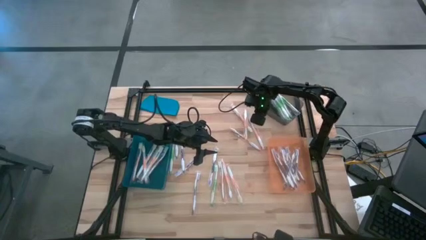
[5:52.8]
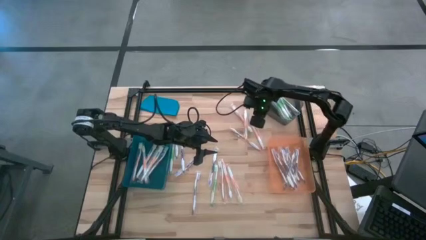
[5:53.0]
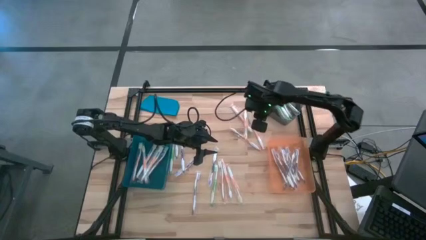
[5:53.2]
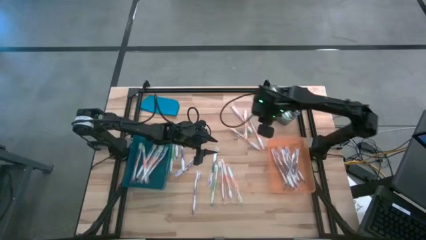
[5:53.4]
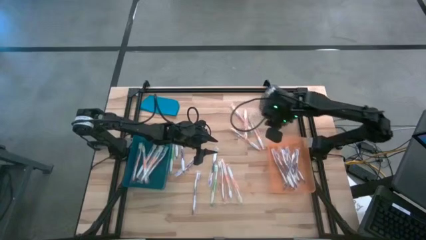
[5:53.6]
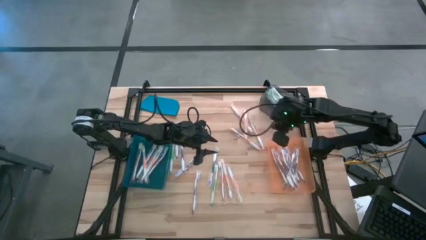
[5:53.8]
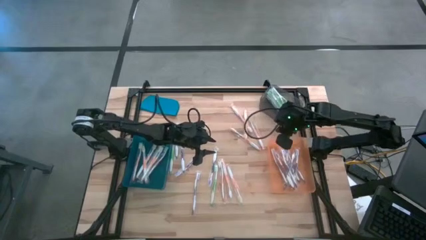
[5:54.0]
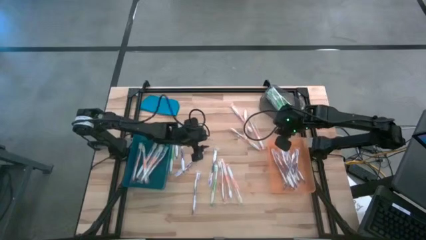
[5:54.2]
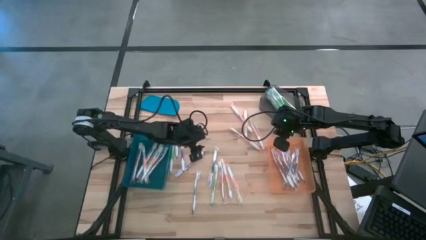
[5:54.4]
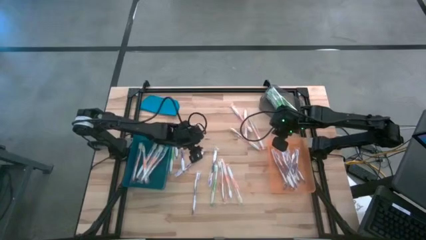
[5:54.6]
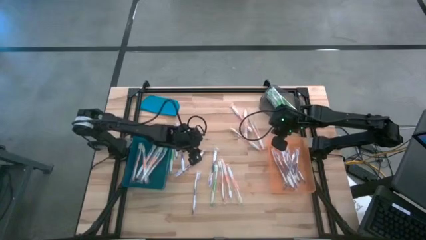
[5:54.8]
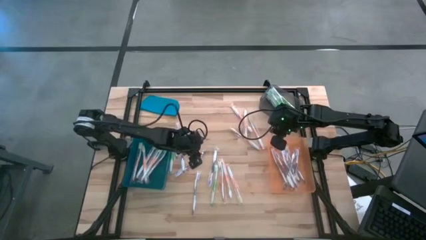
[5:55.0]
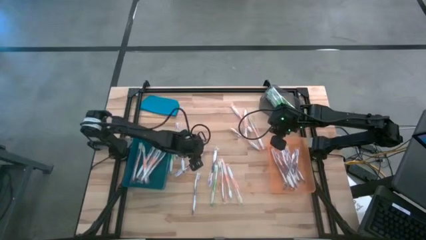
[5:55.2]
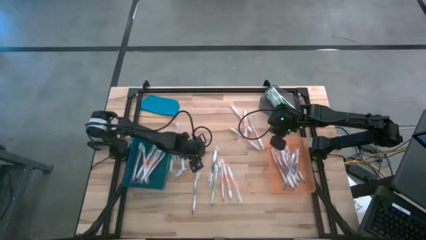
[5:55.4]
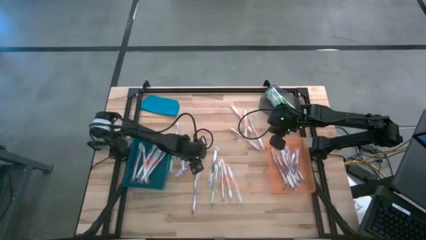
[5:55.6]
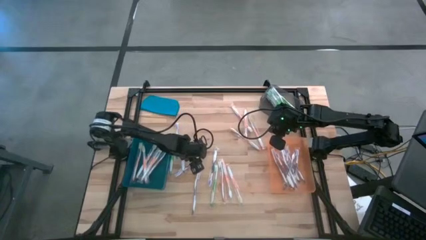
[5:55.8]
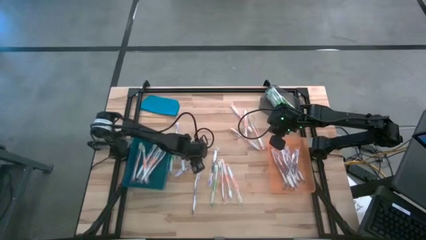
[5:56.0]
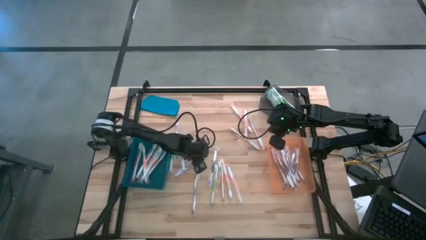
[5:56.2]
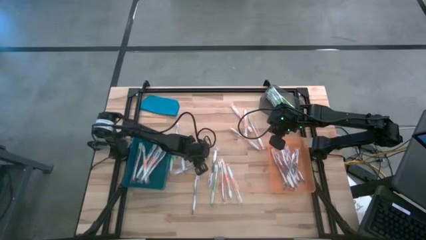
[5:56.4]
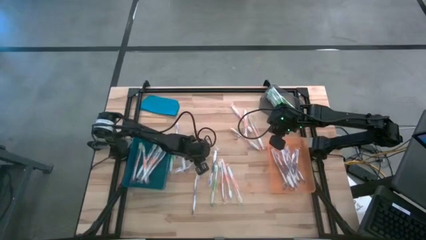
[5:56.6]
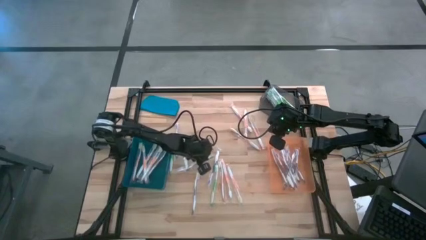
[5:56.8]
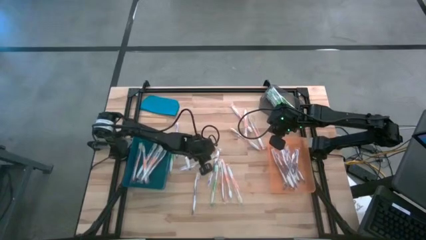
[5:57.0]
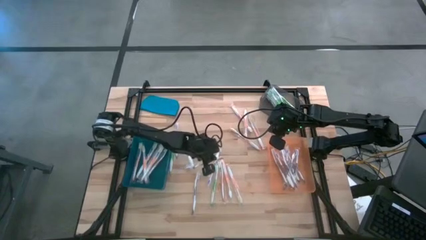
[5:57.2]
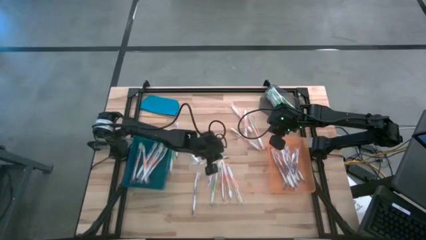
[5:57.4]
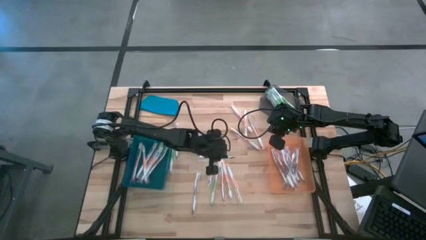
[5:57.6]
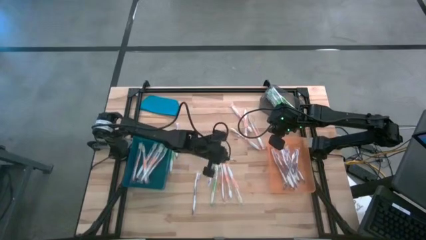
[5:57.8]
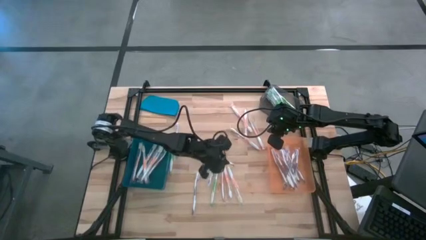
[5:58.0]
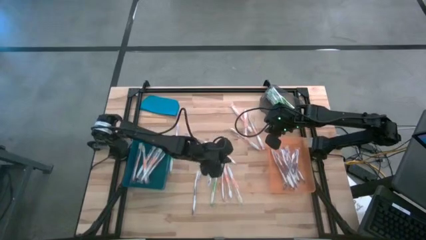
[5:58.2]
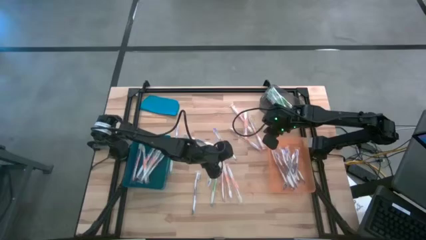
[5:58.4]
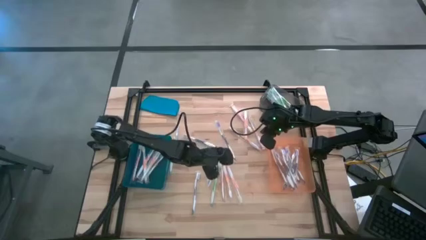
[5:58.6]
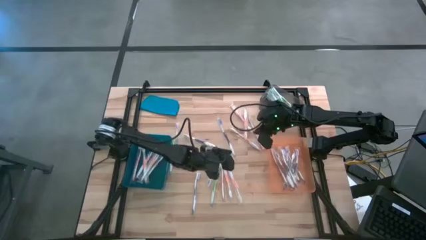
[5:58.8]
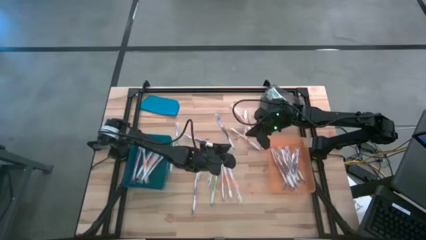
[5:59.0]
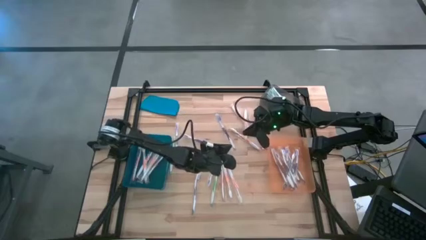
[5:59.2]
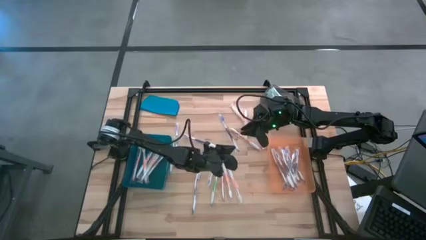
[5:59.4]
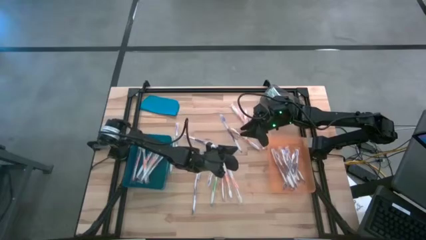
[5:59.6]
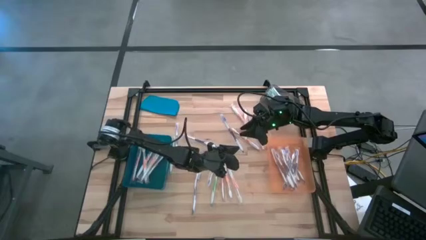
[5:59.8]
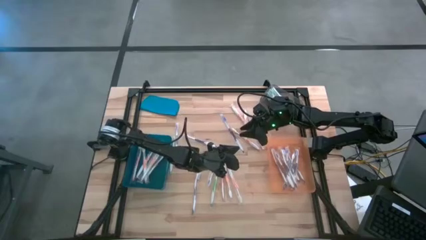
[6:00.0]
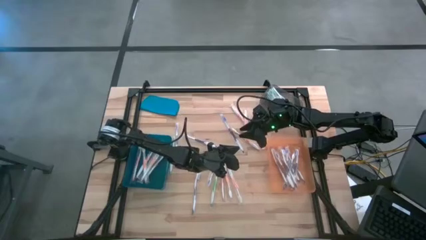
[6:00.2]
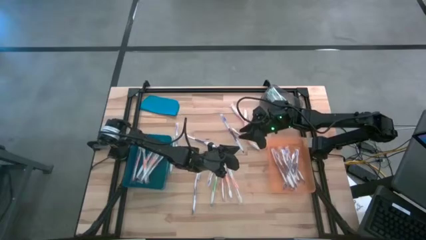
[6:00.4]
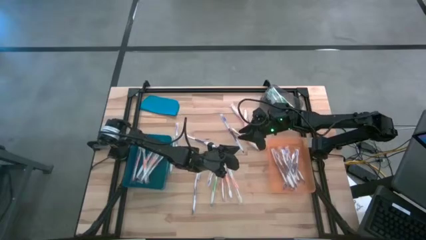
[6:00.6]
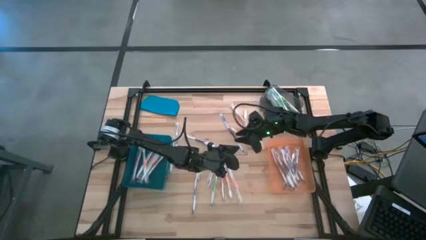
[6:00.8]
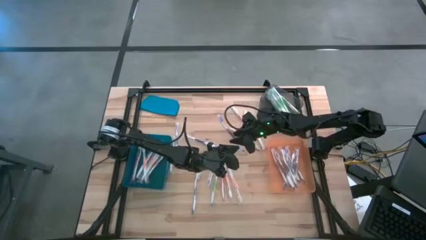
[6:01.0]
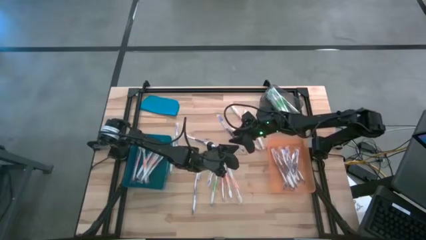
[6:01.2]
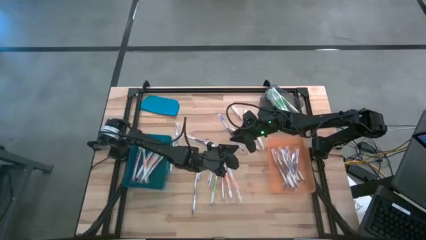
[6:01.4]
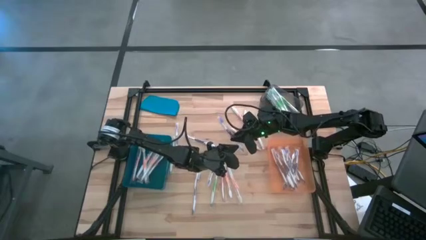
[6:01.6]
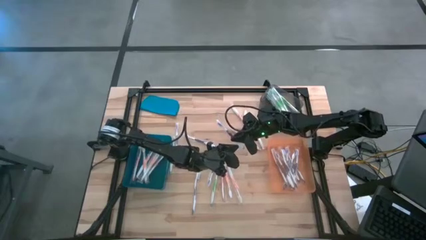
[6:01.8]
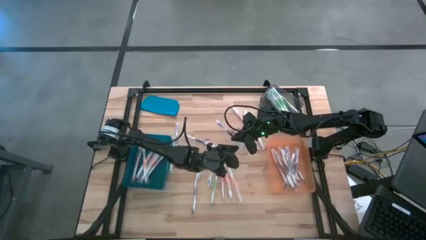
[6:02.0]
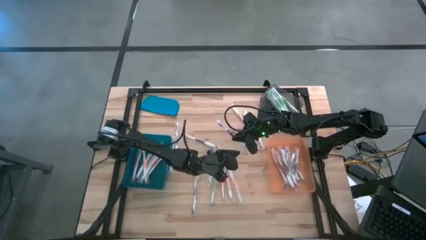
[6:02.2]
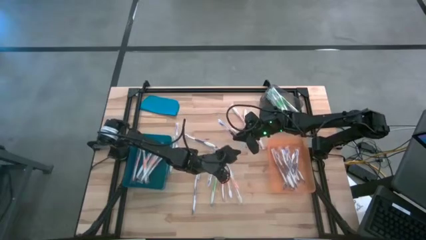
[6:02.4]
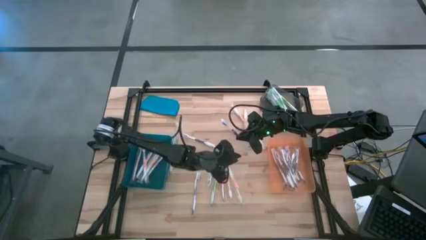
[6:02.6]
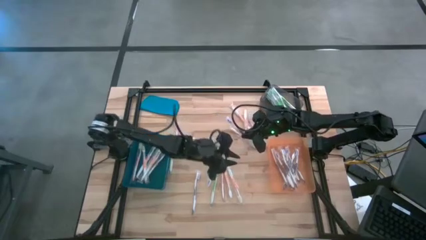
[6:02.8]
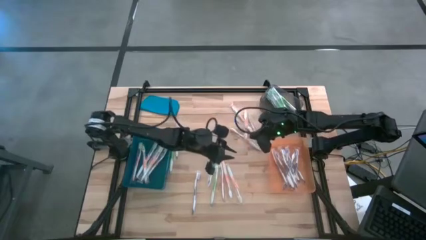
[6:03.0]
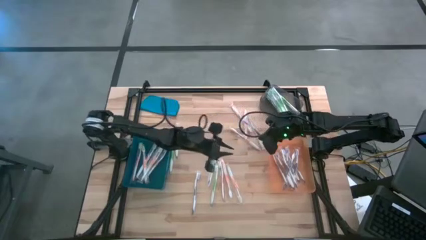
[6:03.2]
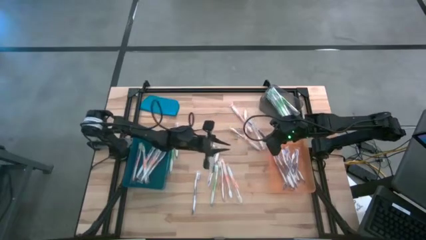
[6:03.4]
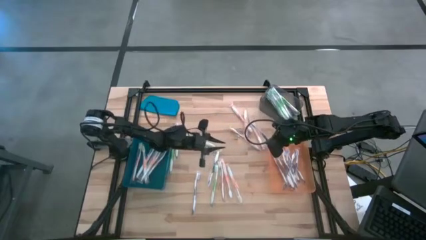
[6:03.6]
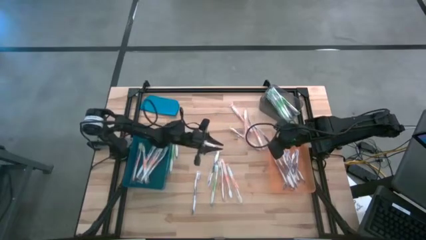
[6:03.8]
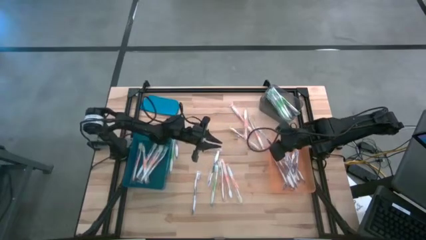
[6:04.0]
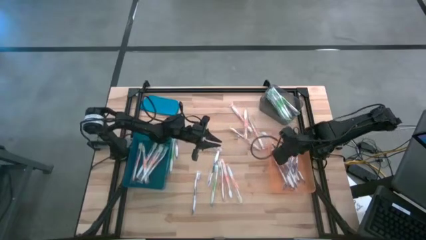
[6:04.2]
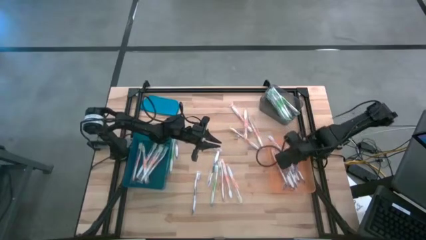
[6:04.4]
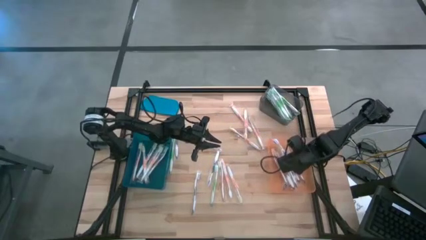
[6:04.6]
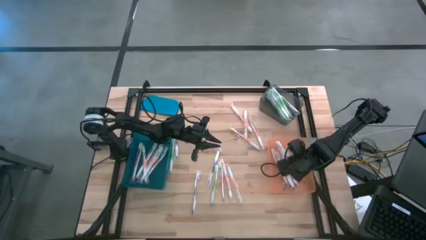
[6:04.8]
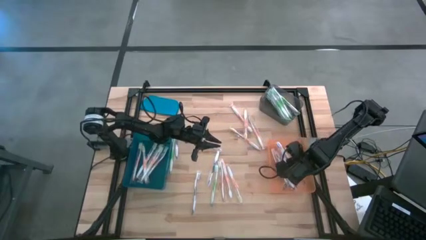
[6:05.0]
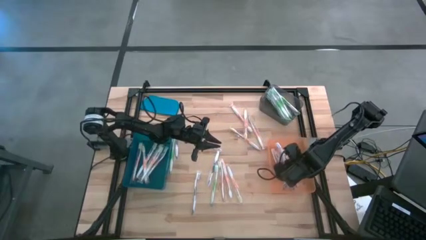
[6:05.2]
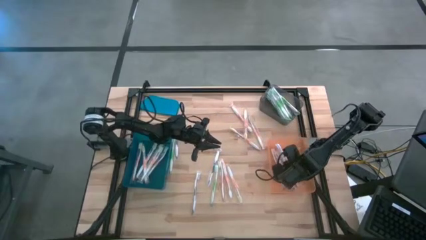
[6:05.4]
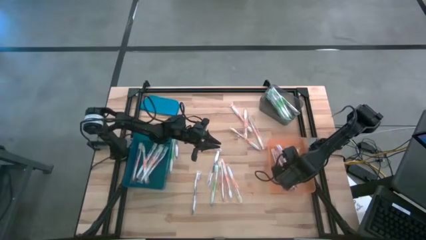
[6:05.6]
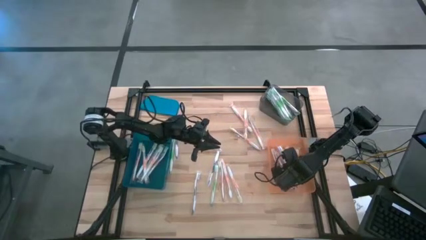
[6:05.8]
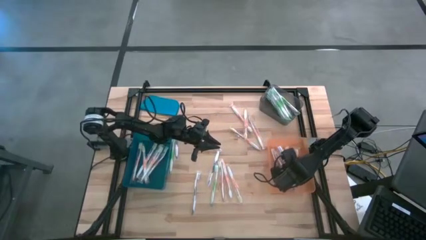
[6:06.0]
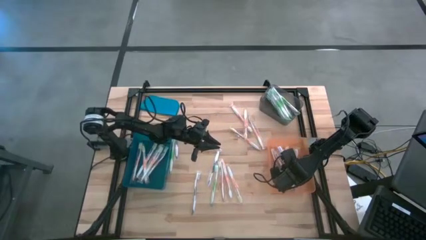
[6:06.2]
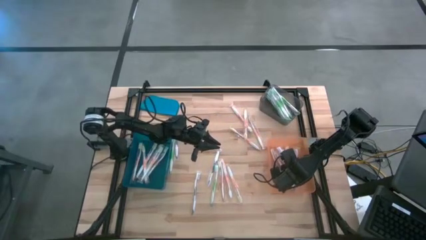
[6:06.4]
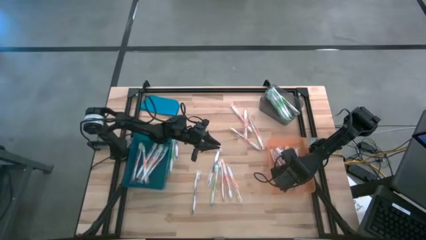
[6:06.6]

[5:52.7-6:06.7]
Task: Pick & Place Toothbrushes
Put the purple toothbrush into the orange bin
